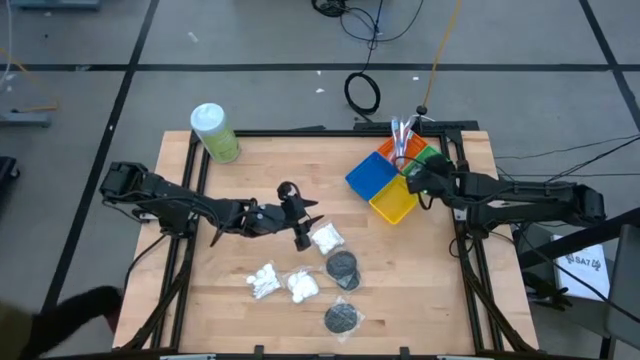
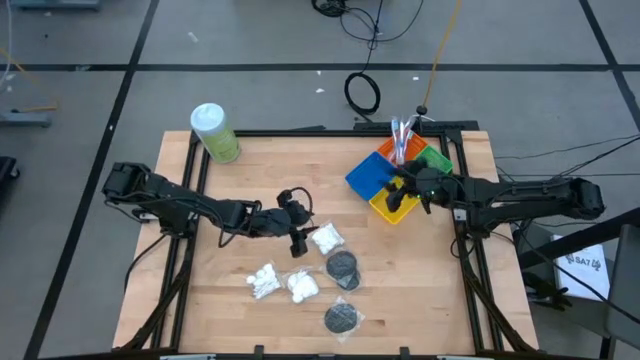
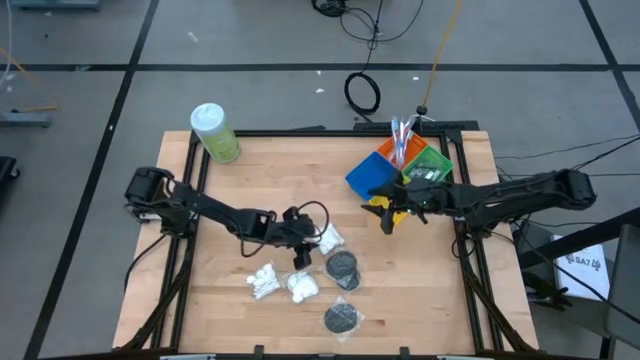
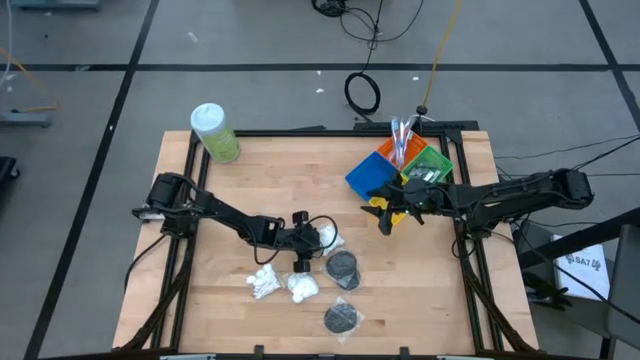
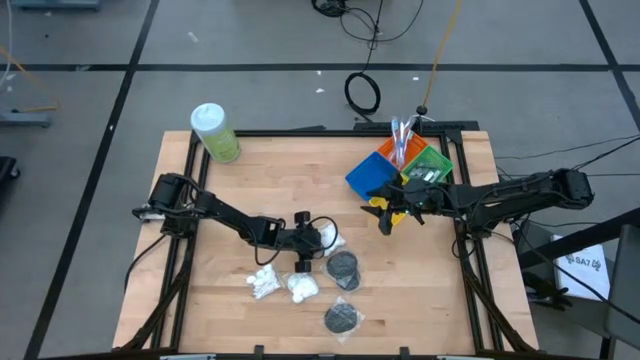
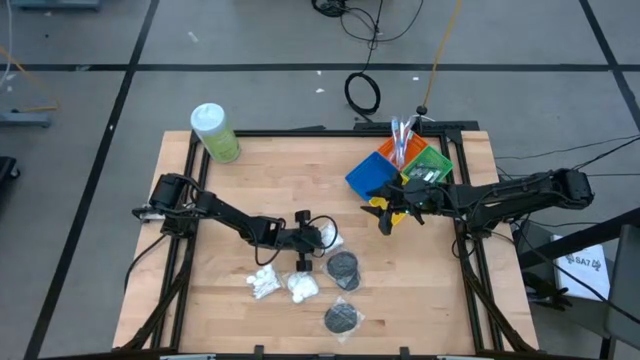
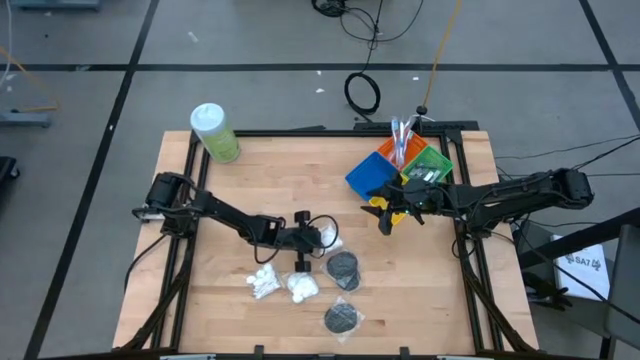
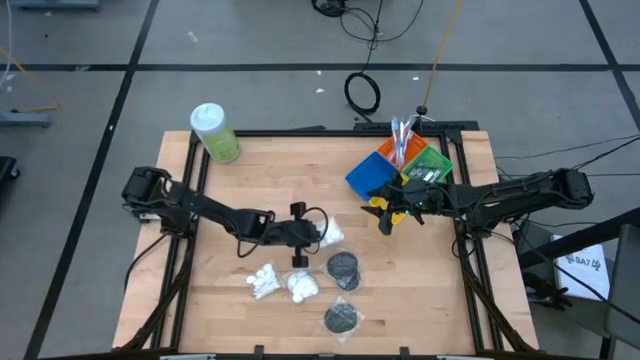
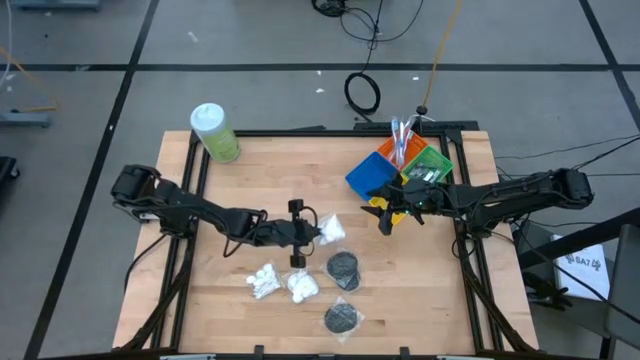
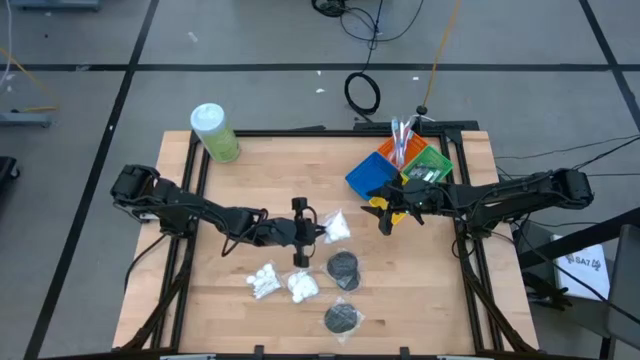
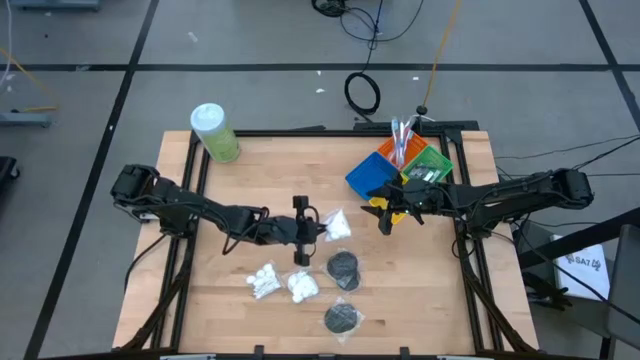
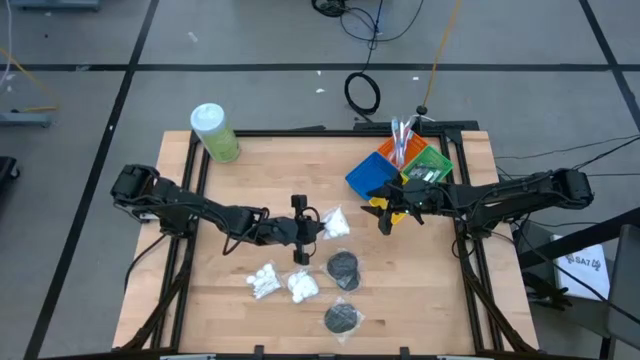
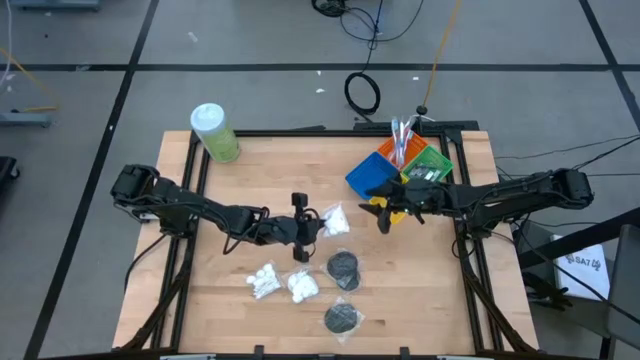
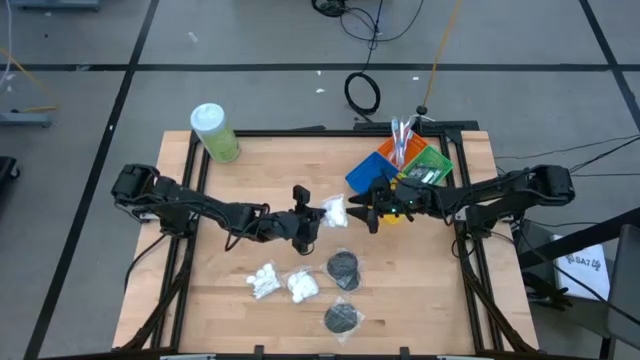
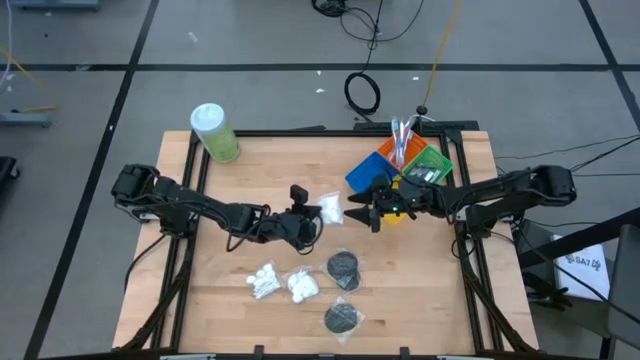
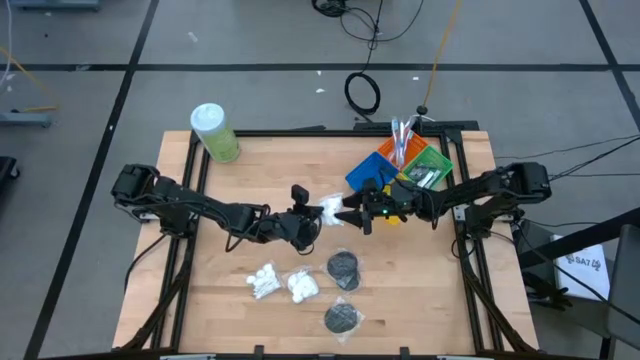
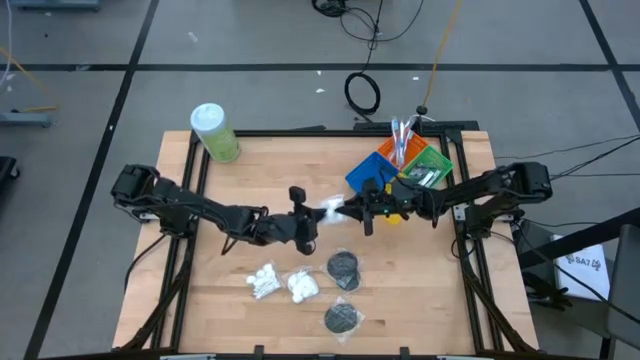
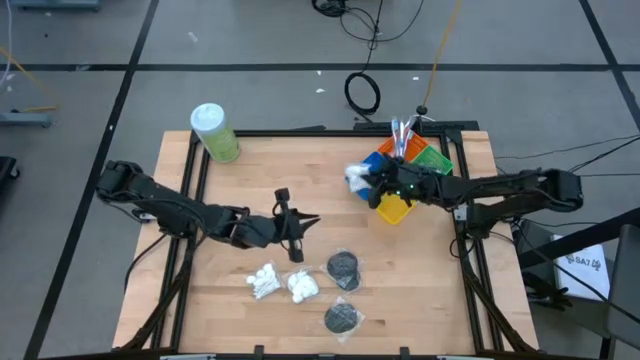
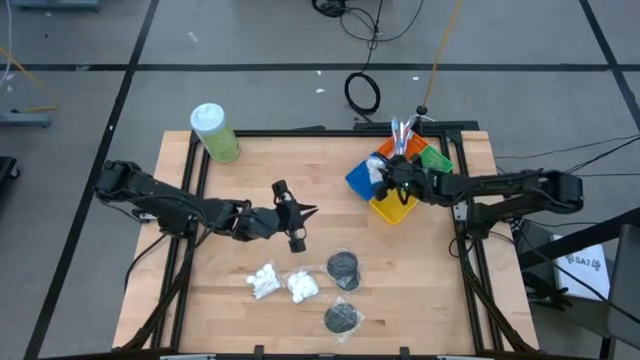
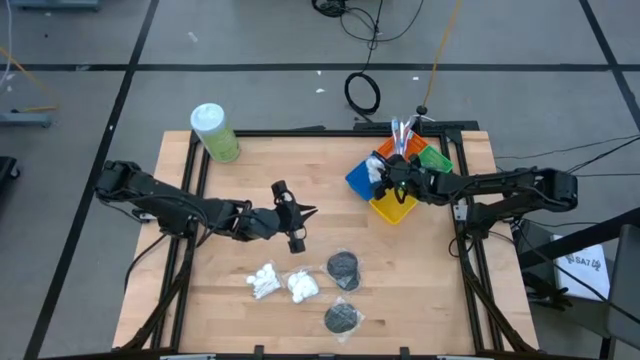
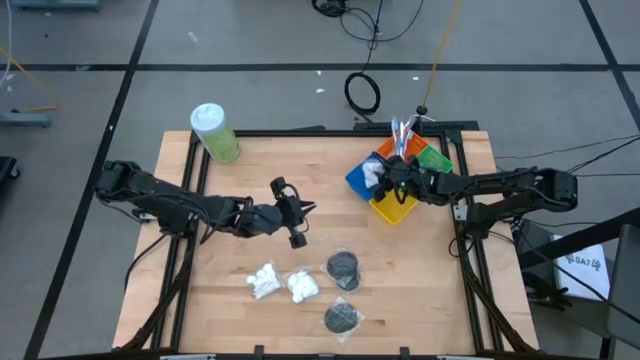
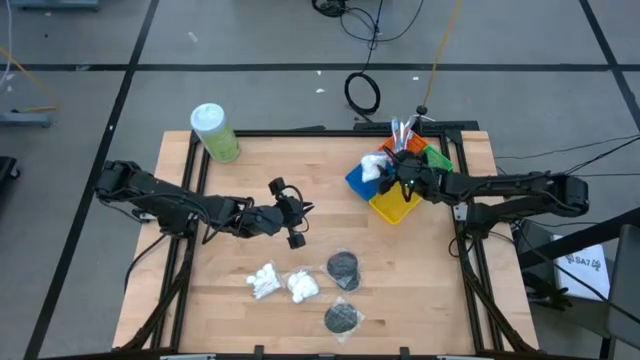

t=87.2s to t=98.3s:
Task: Pick & Place Travel size toiletries
Put the cotton pack into the blue bin

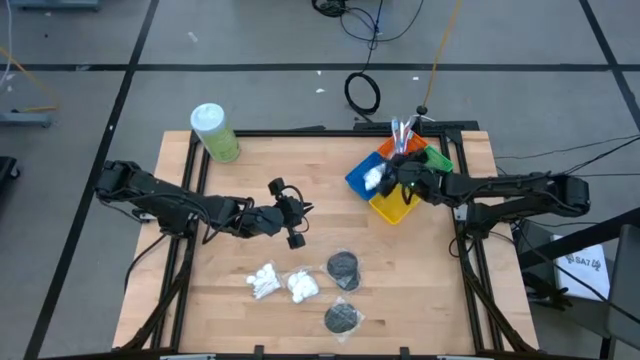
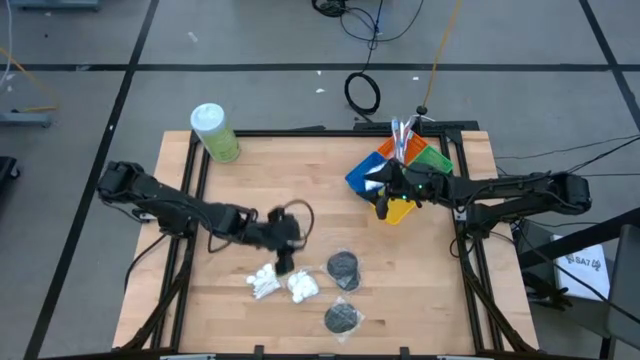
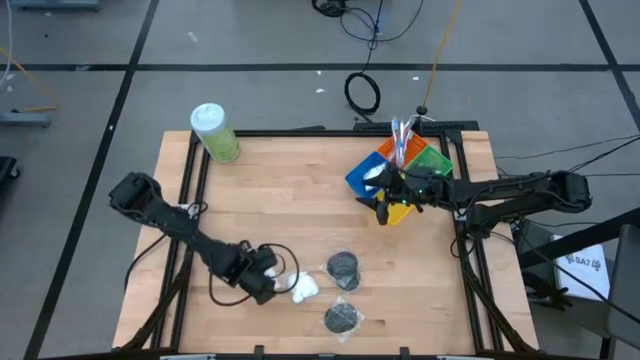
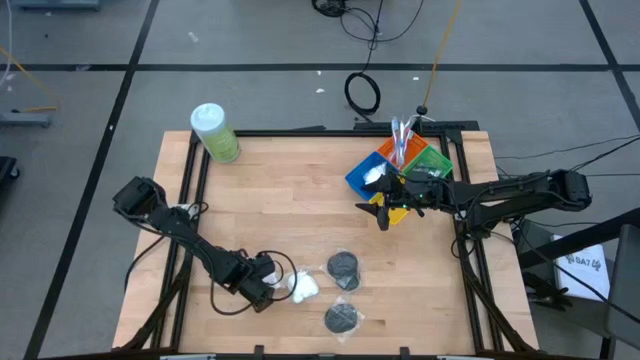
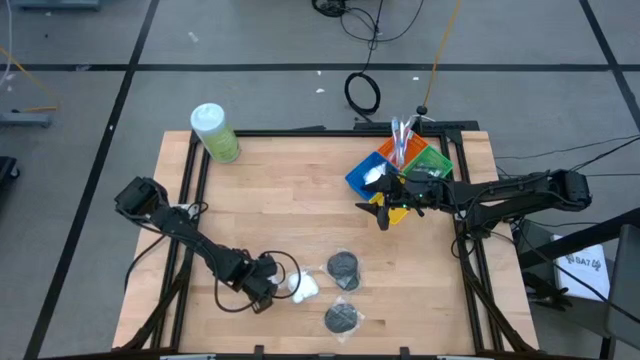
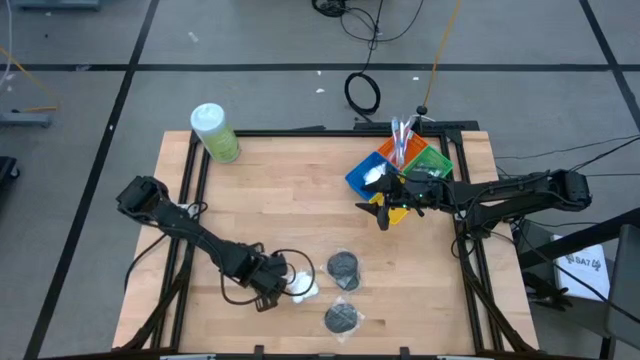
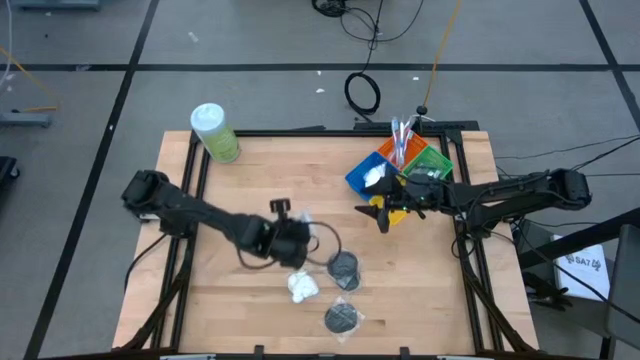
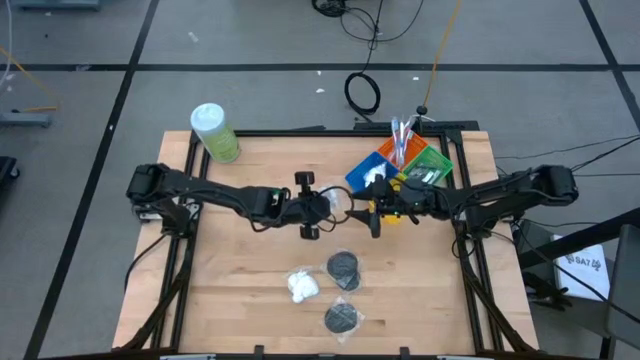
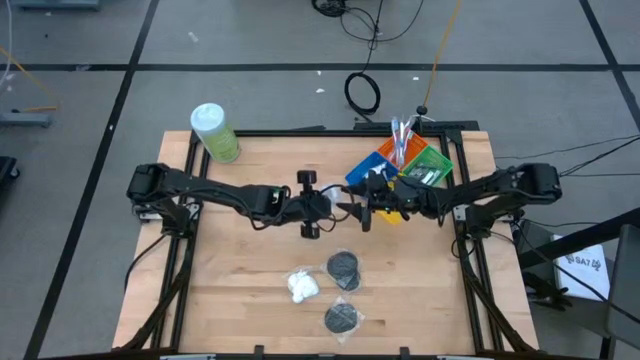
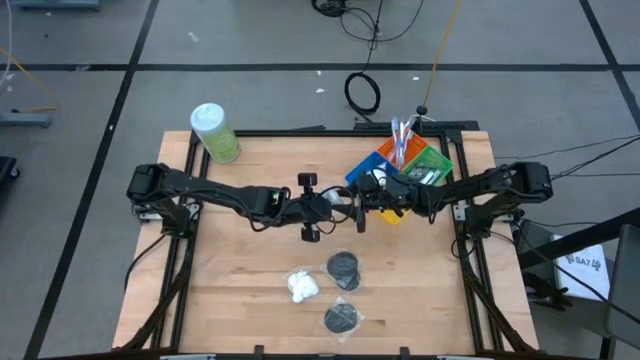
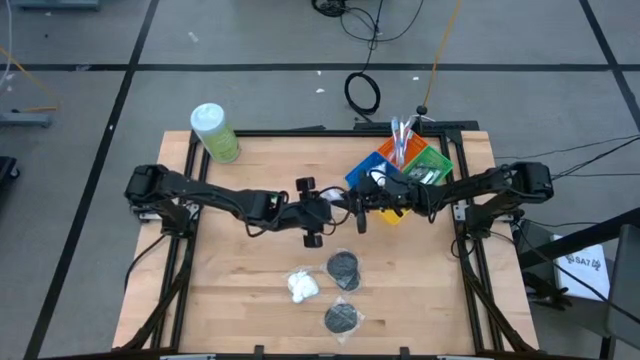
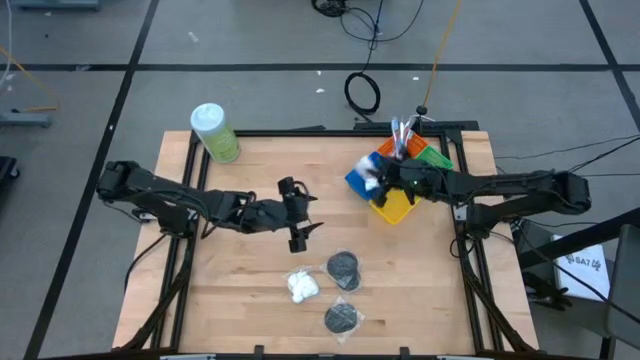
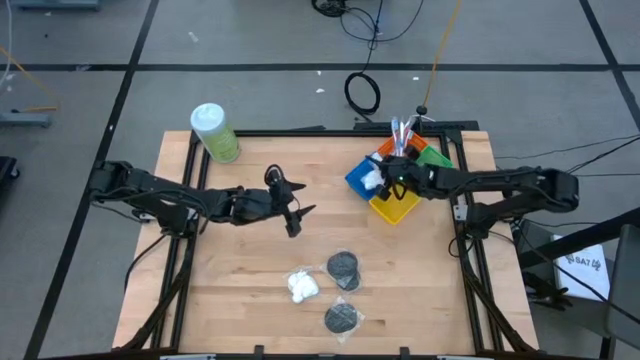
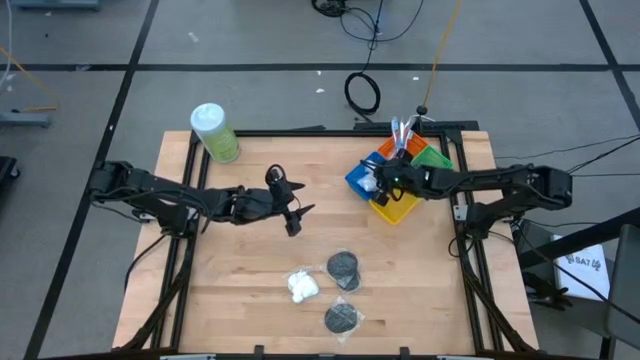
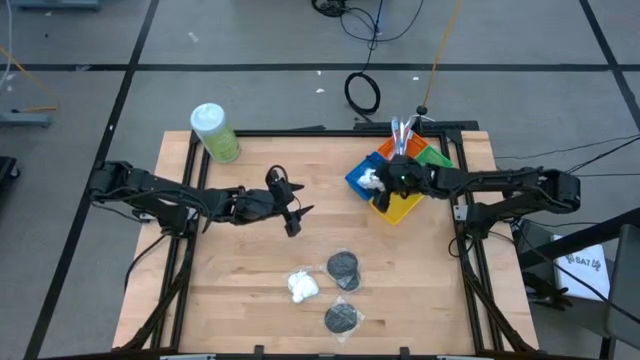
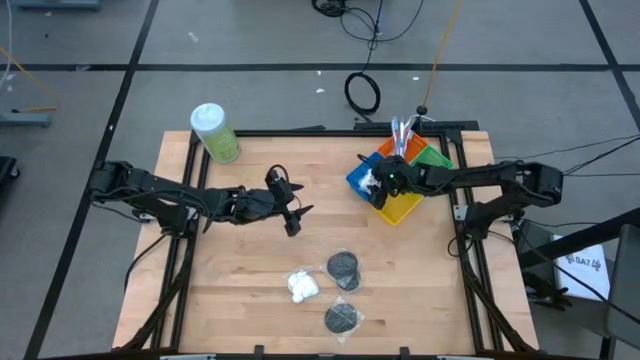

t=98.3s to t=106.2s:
Put the cotton pack into the blue bin

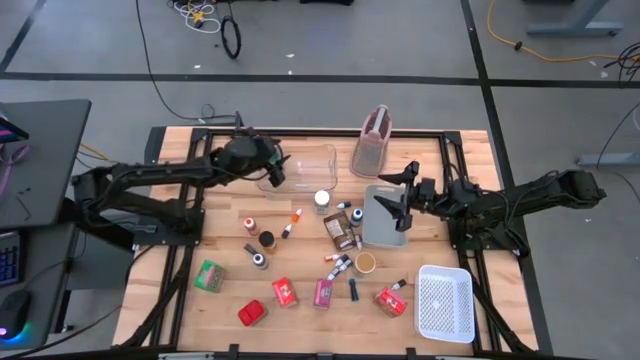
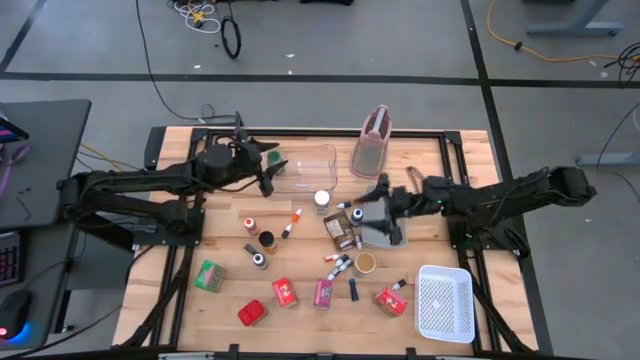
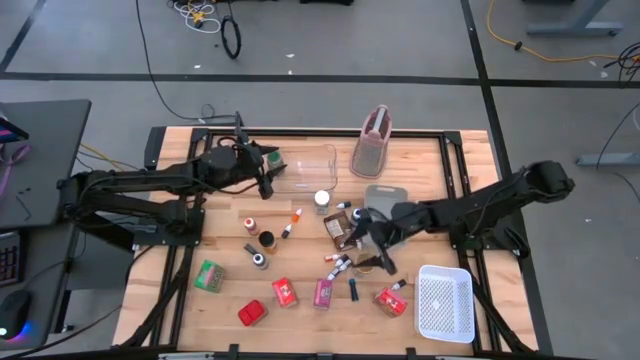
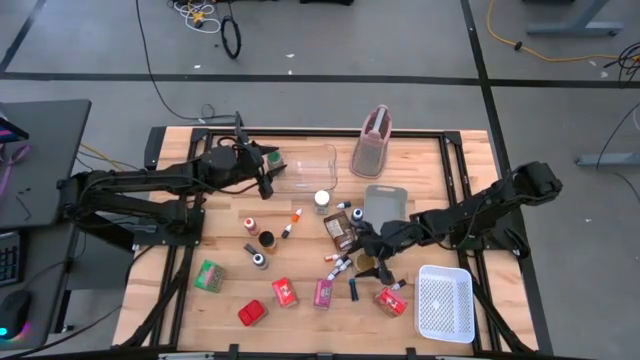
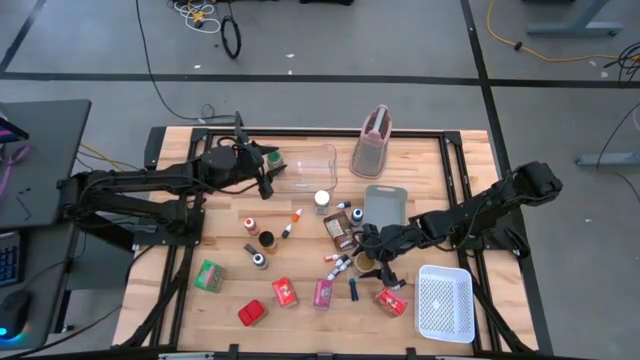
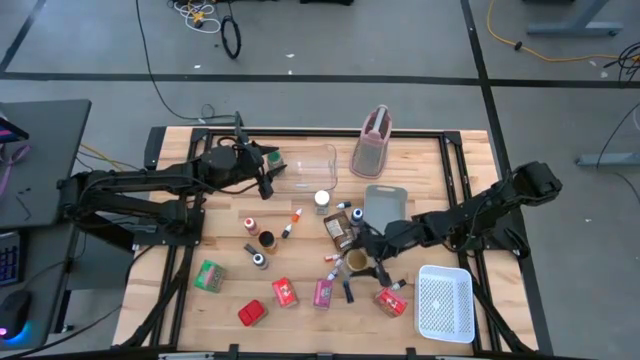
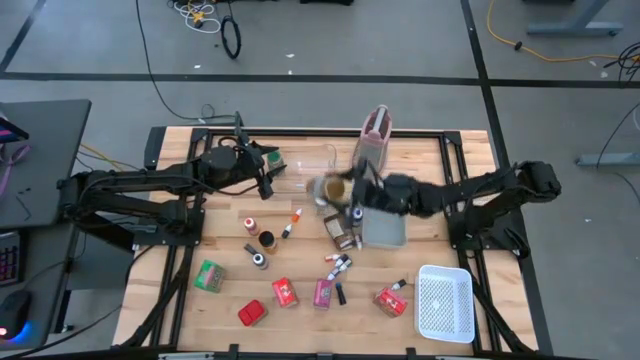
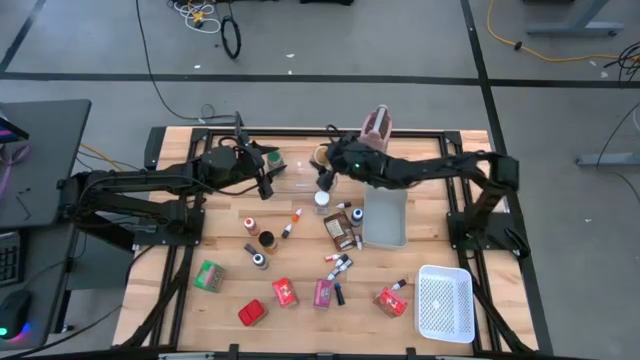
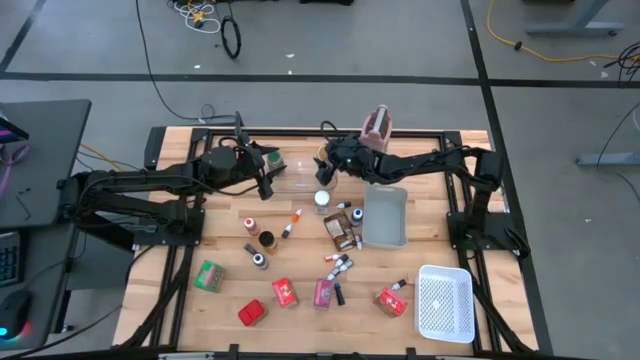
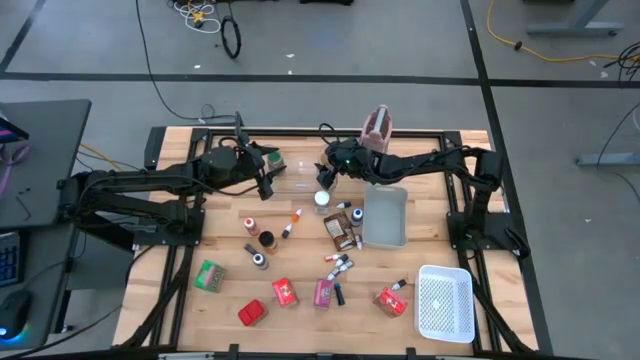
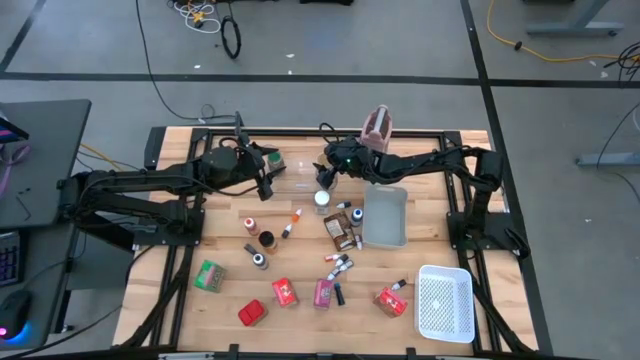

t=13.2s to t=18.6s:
Task: Pick & Place Kitchen Items
Put the gold seasoning bottle into the transparent bin
